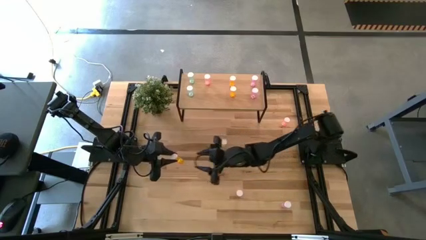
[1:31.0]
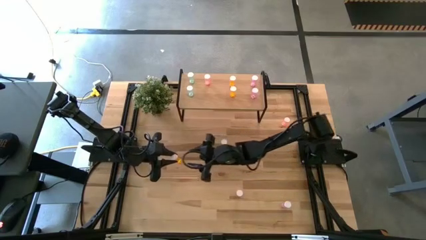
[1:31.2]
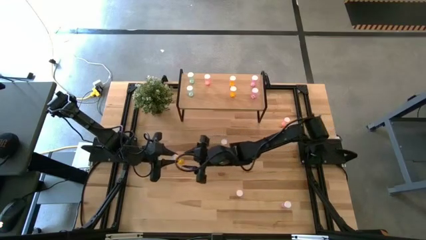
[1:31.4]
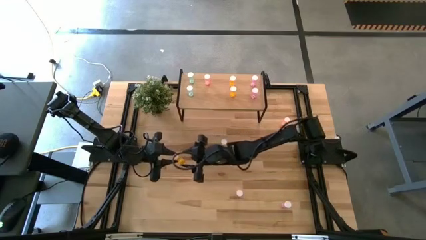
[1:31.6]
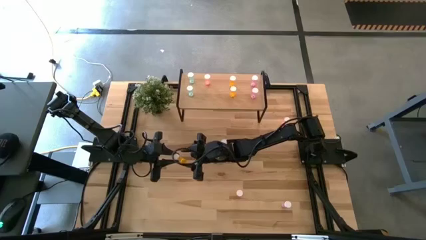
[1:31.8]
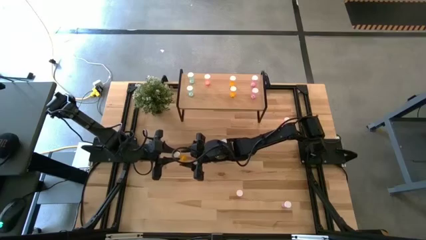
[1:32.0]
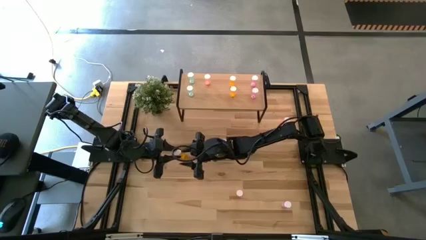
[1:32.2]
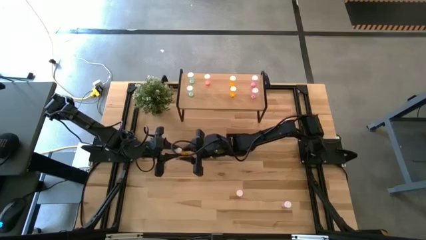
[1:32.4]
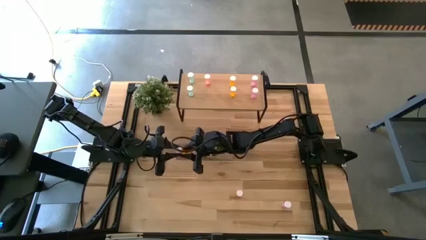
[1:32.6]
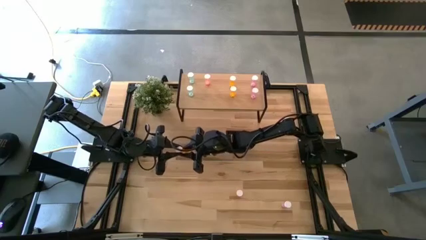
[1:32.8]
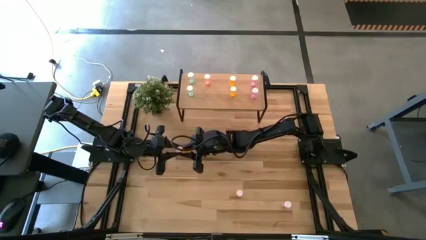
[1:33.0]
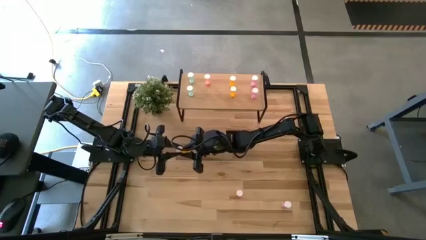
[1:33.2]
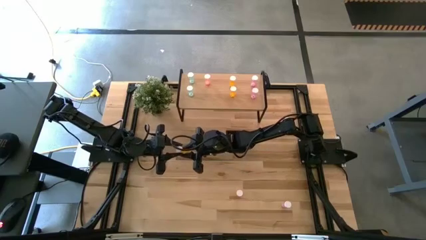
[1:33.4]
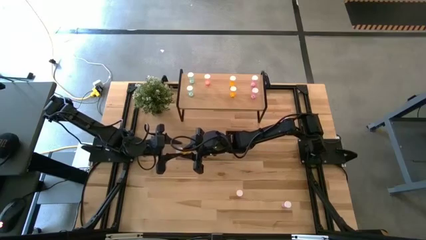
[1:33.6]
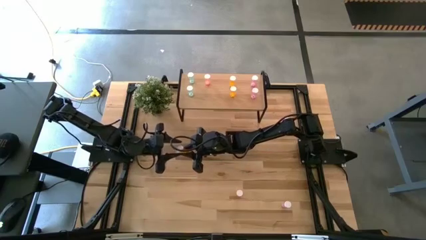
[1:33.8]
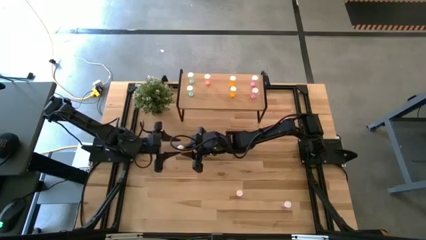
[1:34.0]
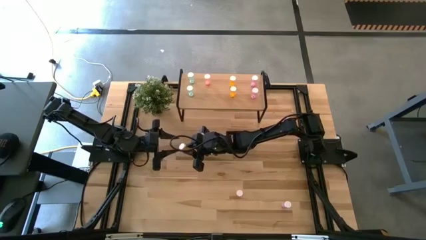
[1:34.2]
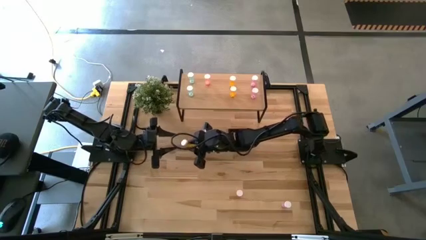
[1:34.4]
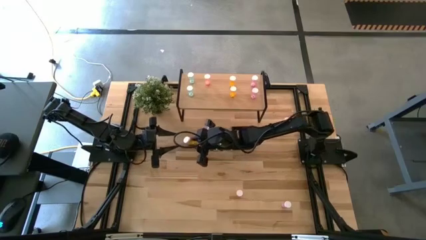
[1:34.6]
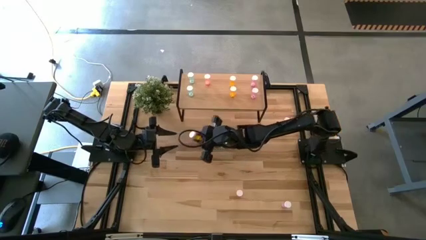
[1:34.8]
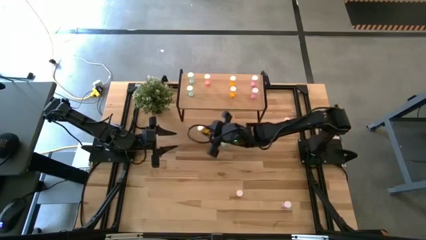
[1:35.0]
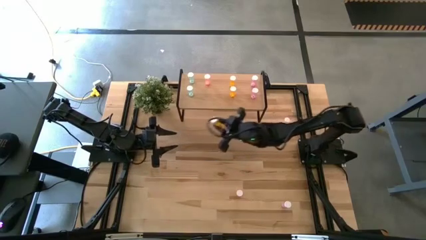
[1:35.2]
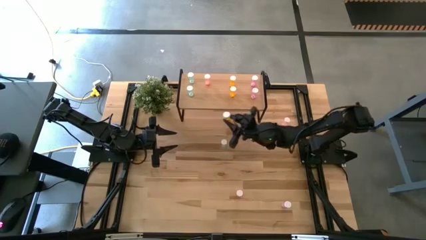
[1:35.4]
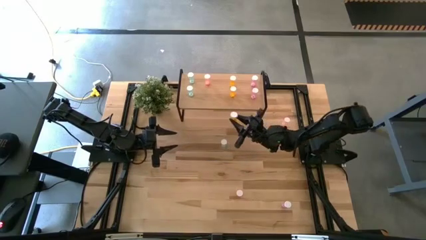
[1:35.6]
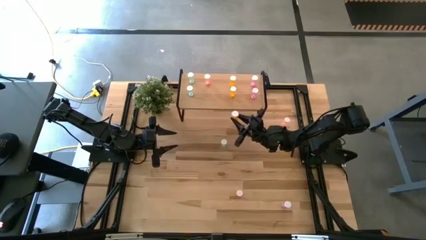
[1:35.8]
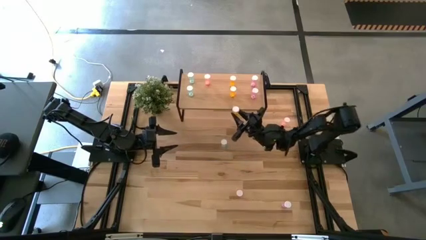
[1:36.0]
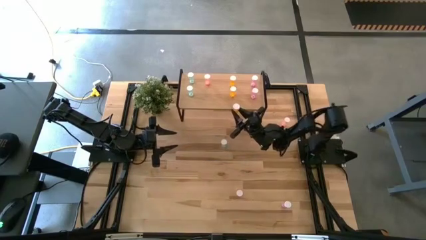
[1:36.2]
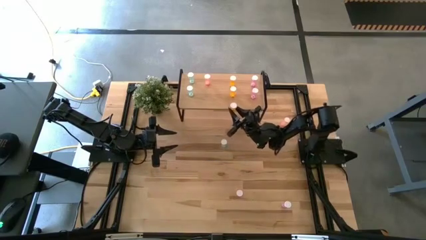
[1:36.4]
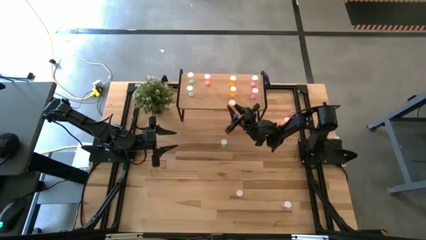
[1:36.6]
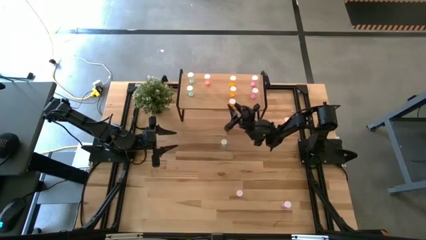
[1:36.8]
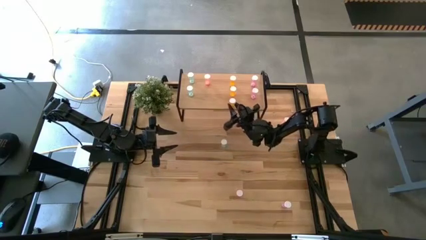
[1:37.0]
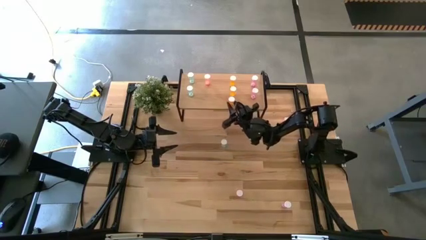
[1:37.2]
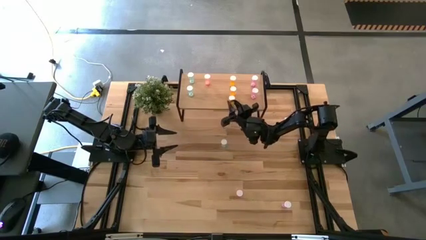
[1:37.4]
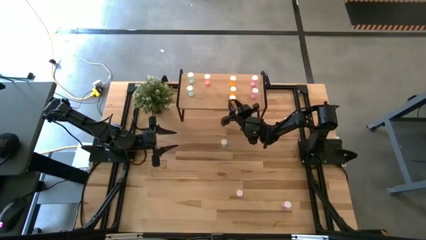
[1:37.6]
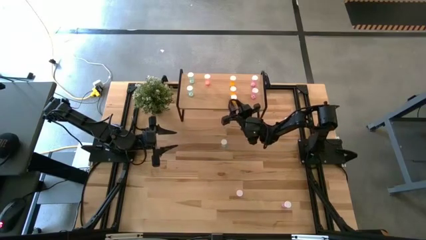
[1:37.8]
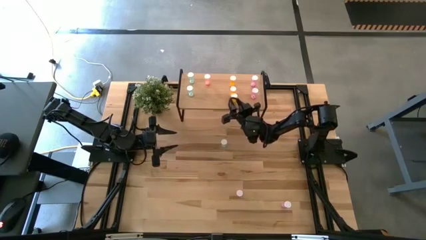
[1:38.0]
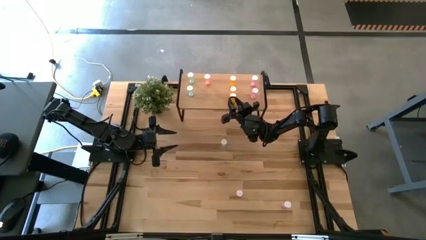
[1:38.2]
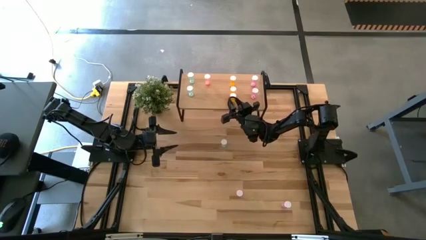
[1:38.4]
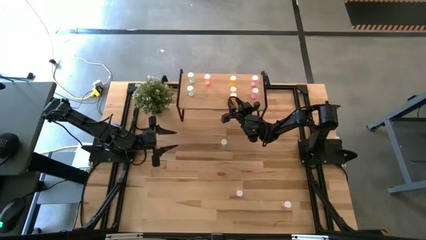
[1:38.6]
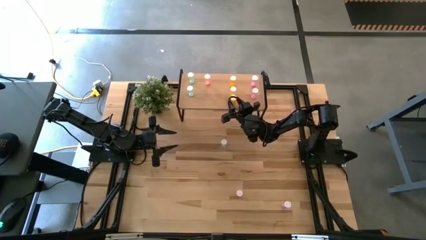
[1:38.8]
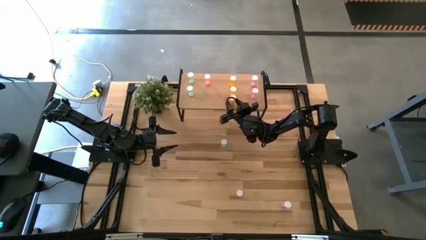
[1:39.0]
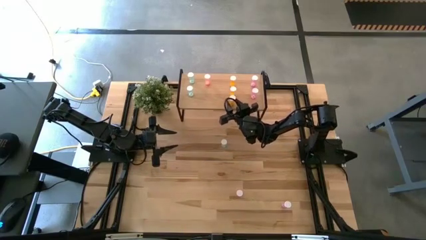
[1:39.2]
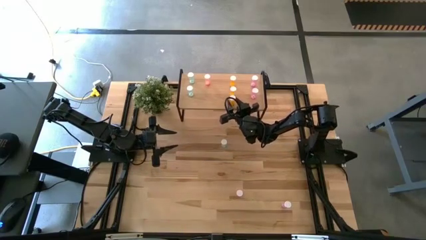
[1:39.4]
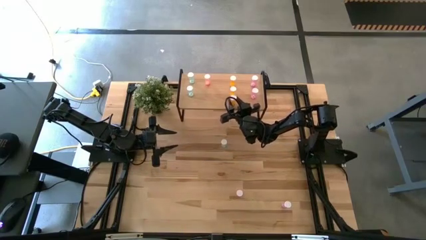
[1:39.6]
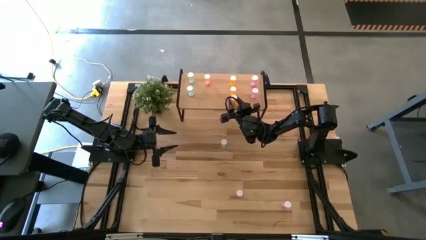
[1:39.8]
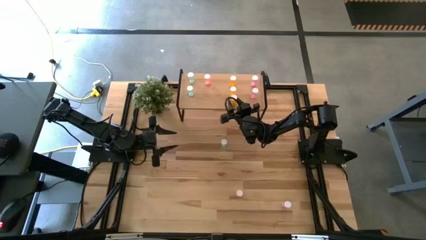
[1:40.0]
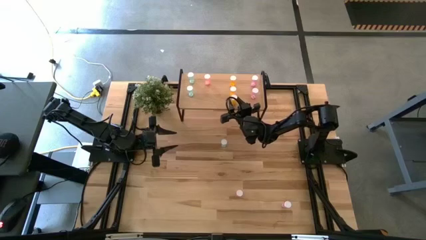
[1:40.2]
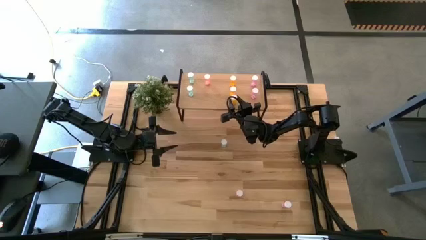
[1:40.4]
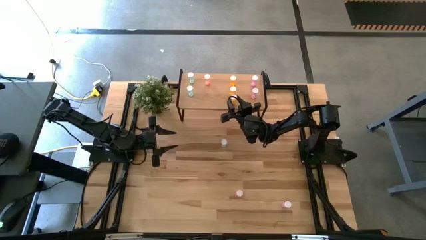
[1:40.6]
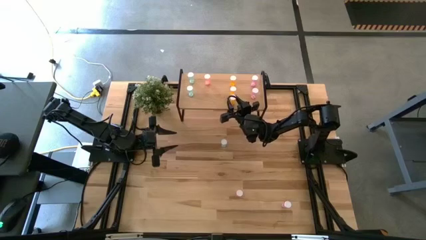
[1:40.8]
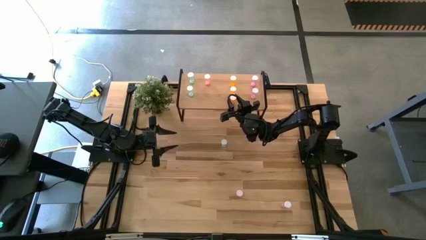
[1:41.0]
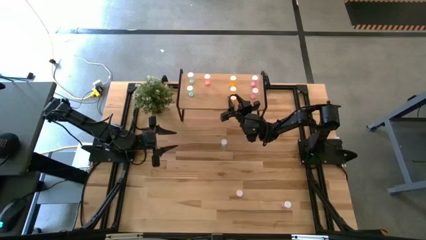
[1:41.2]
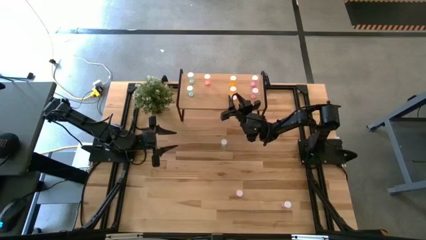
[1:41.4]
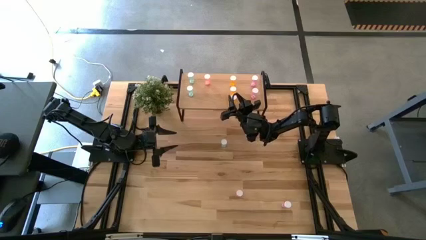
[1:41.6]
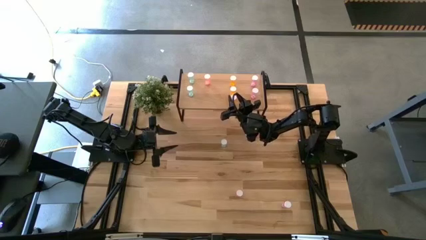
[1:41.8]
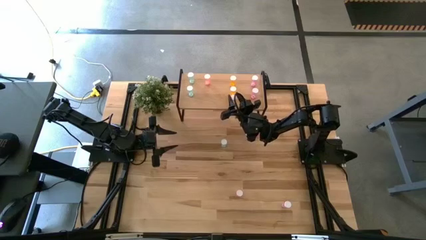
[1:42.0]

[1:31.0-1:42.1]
Task: Pick and place medicine bottles onto shelf by color
Put the orange pill bottle on the shelf aligned with the other orange pill bottles
